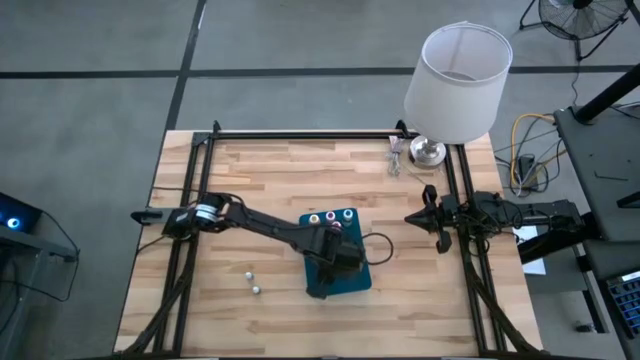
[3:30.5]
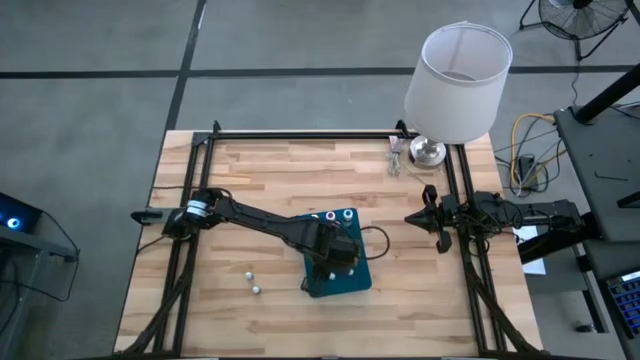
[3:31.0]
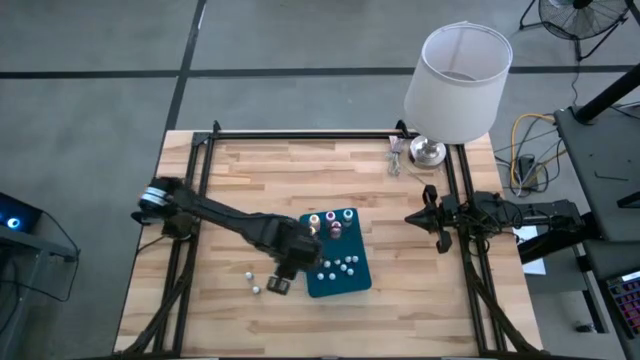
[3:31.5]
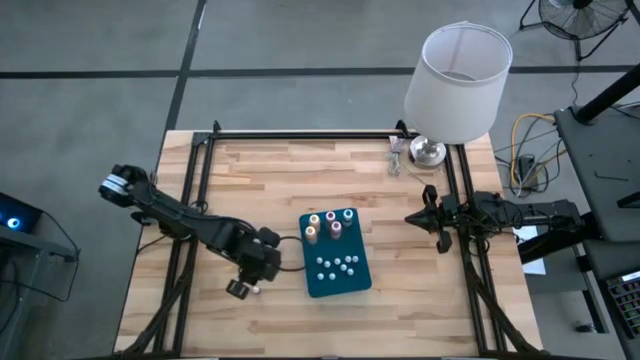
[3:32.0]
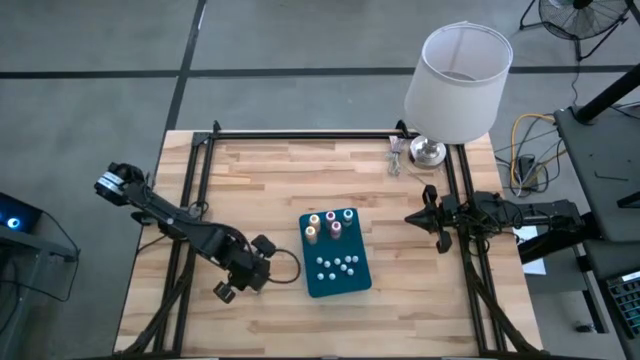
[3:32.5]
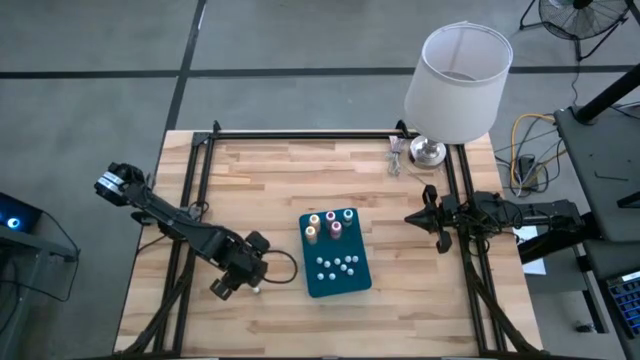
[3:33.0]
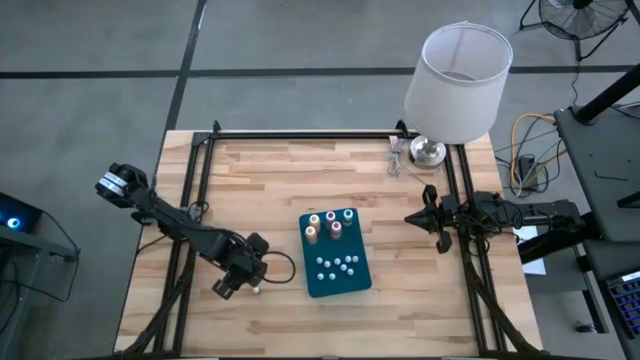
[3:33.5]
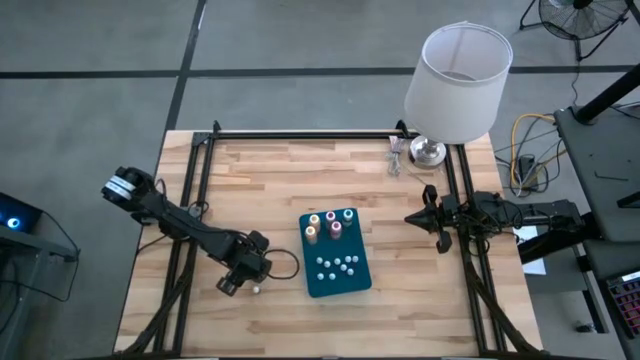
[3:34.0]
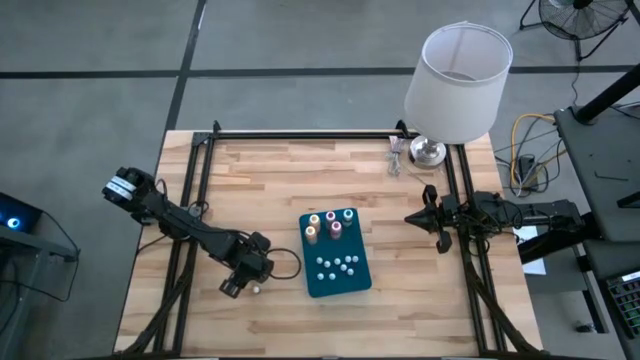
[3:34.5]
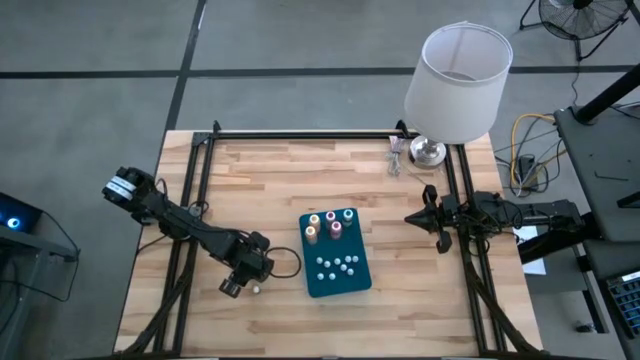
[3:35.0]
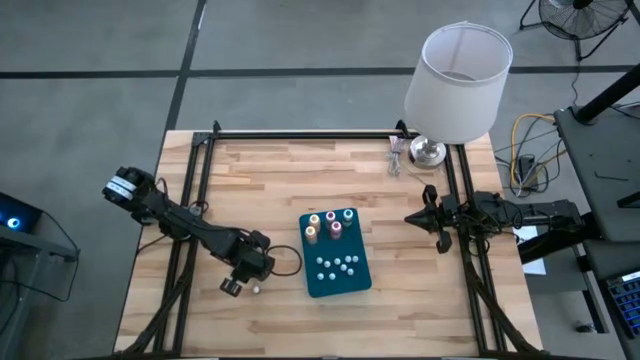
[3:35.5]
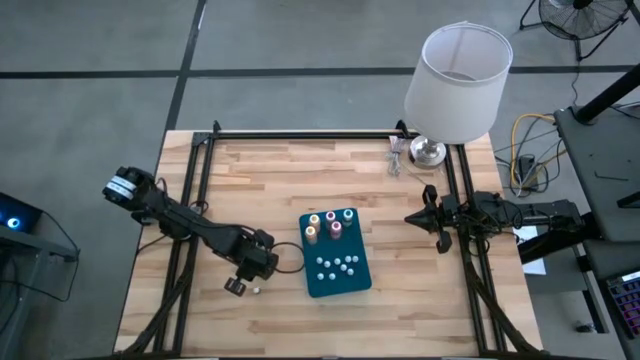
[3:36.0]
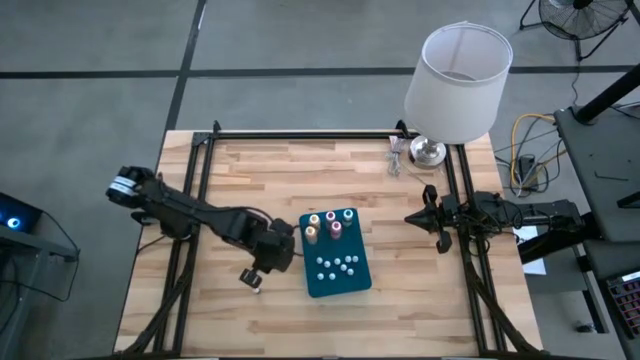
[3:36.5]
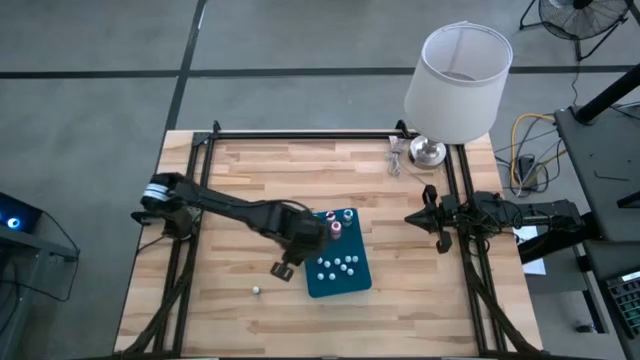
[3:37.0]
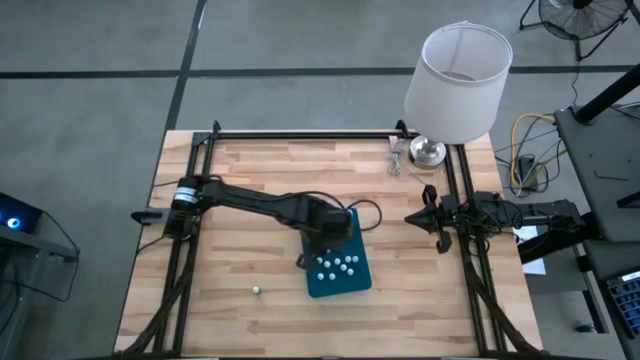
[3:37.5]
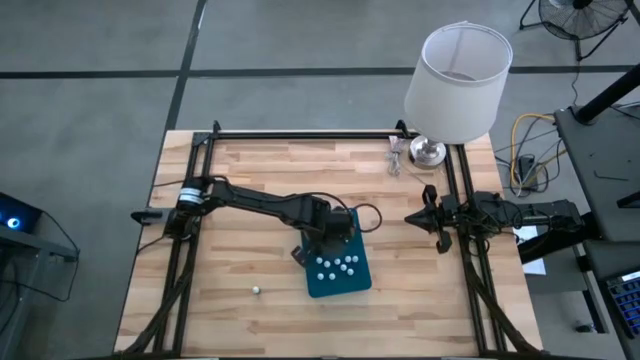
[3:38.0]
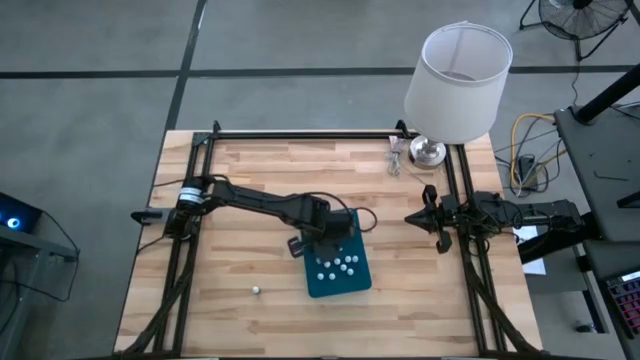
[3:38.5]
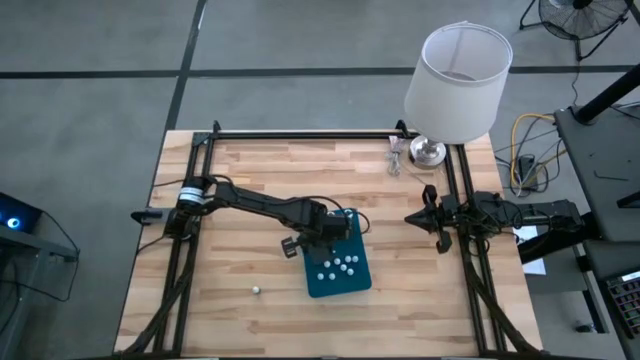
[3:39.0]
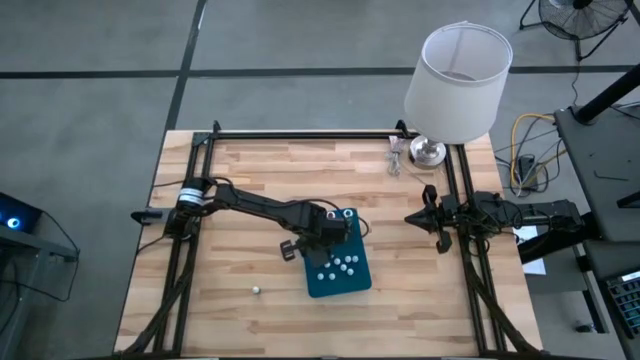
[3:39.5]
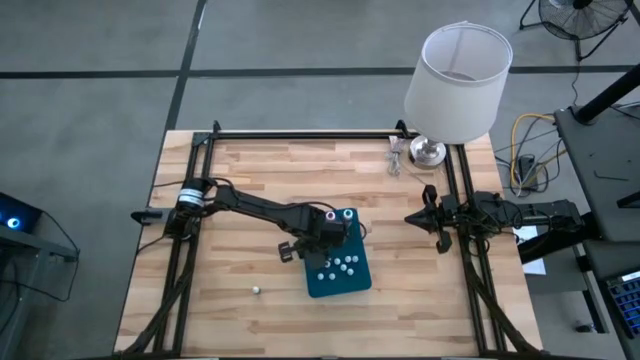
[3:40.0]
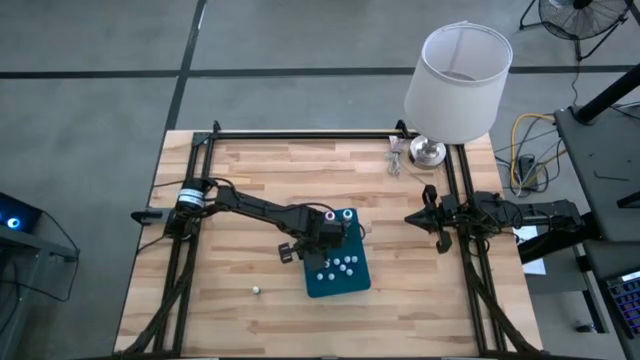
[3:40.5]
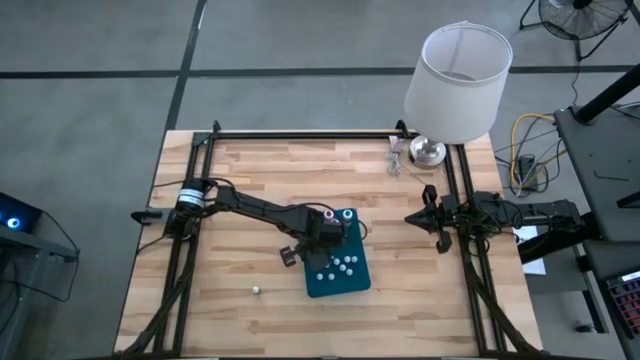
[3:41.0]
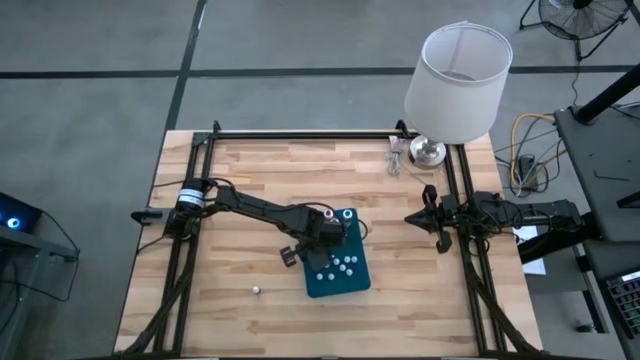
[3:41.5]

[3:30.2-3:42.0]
Task: Pick & Place food coloring
Put the top small black food coloring bottle into the blue bin

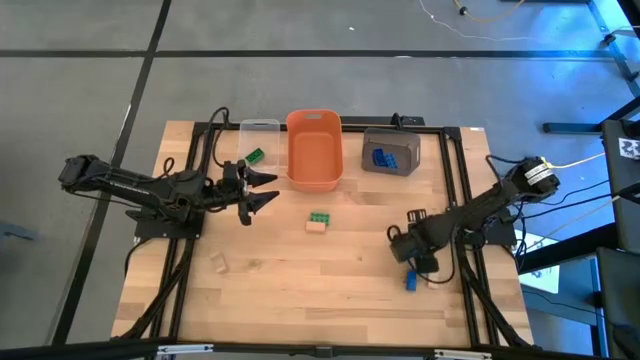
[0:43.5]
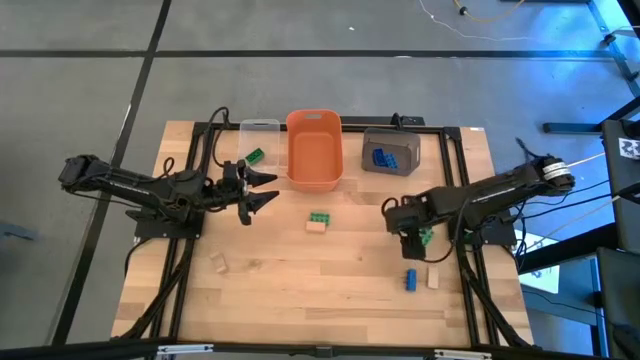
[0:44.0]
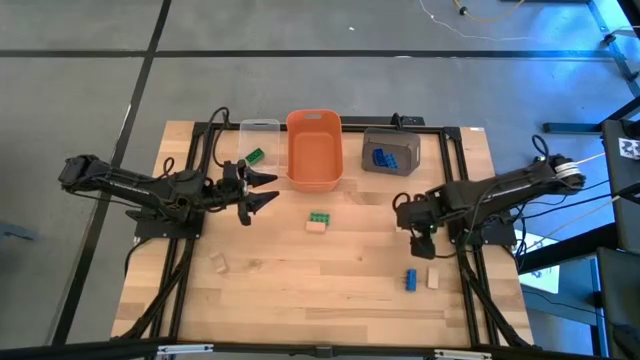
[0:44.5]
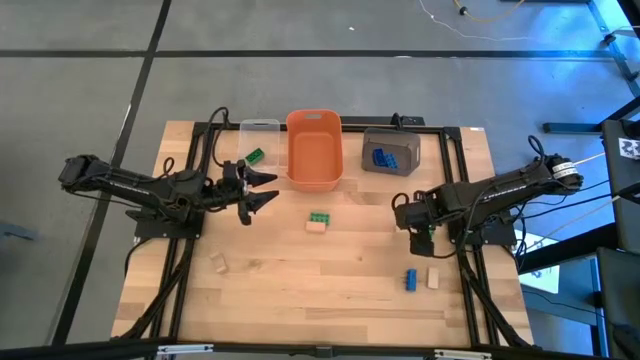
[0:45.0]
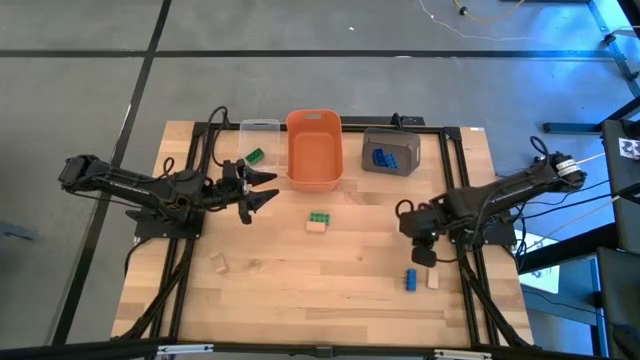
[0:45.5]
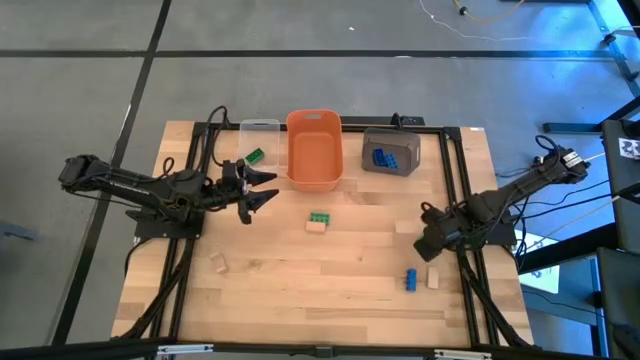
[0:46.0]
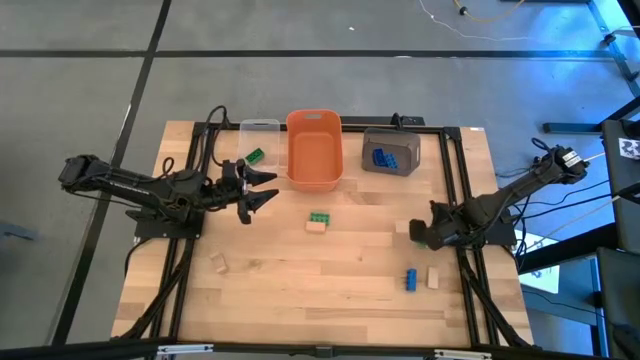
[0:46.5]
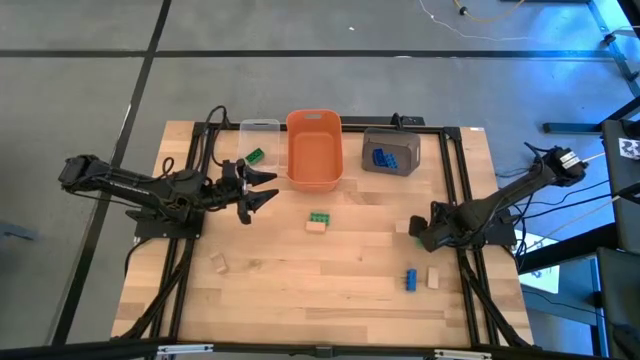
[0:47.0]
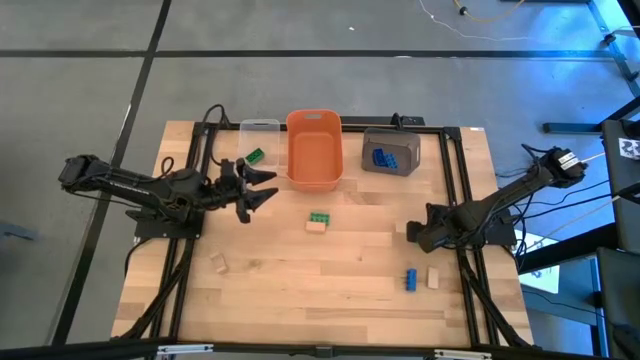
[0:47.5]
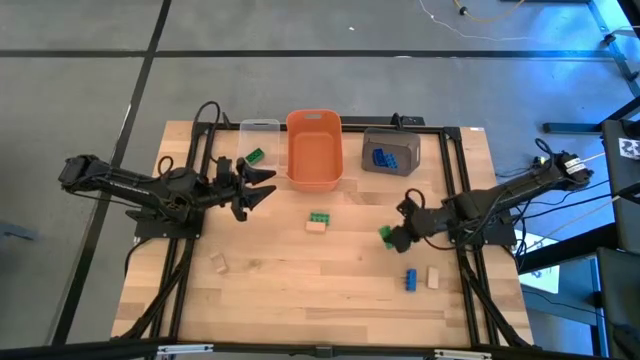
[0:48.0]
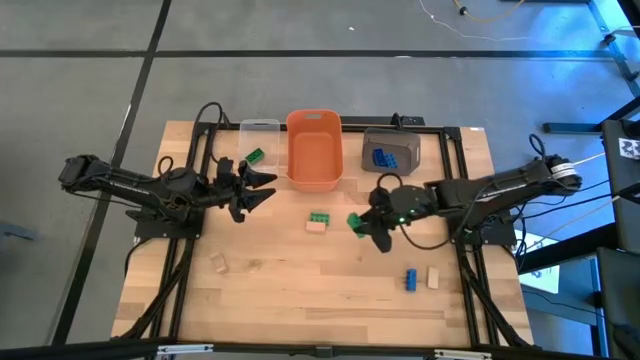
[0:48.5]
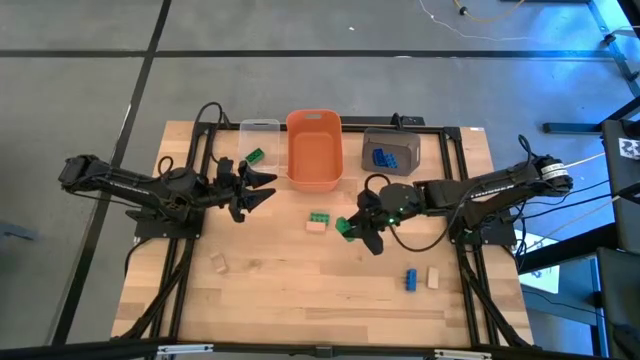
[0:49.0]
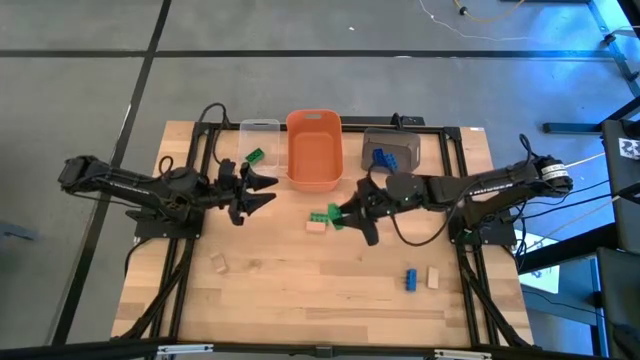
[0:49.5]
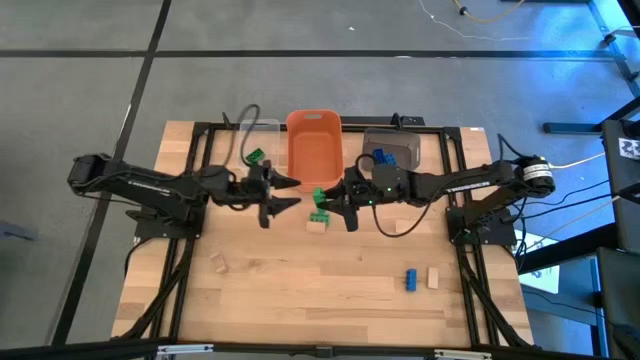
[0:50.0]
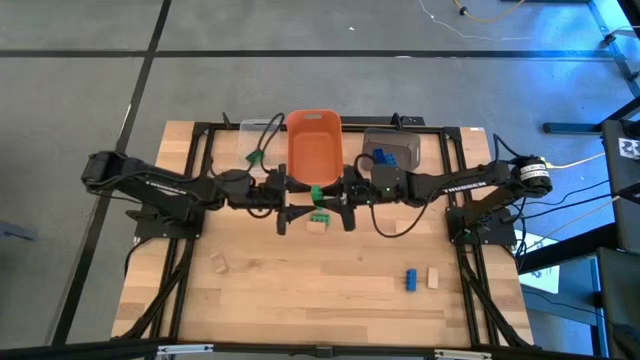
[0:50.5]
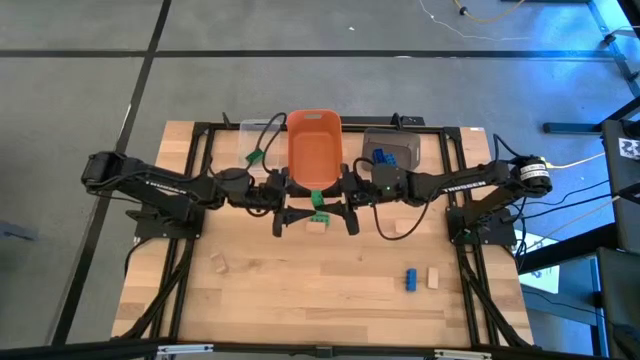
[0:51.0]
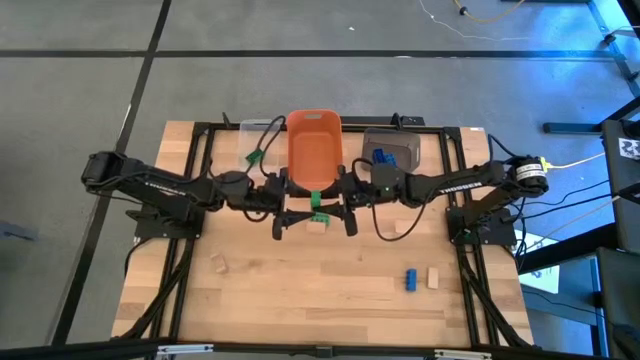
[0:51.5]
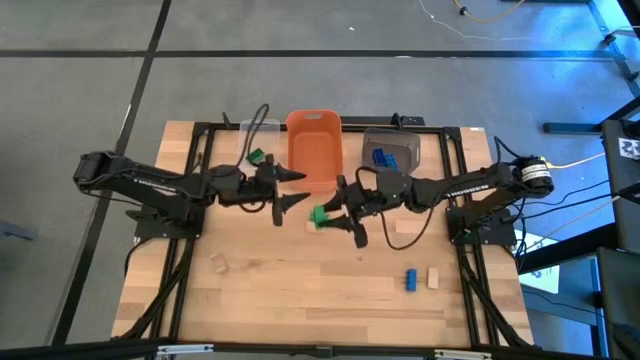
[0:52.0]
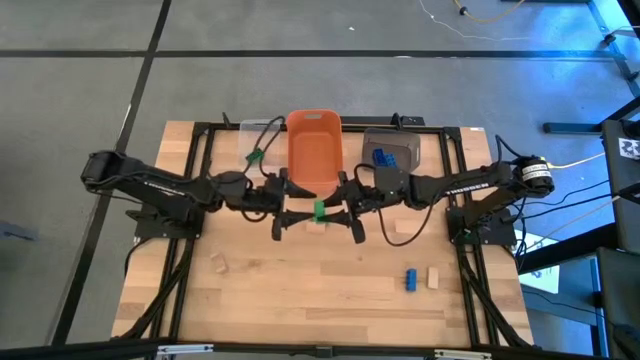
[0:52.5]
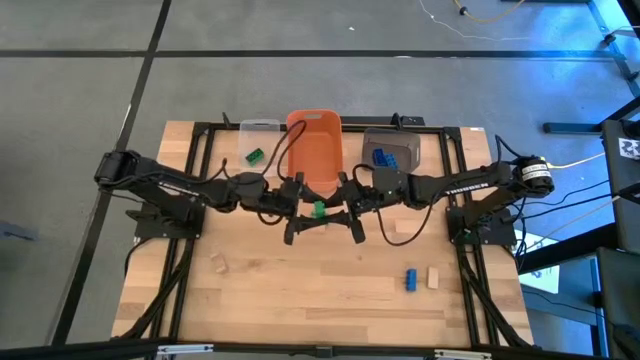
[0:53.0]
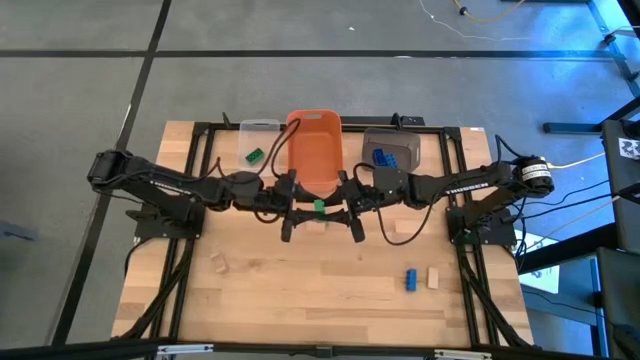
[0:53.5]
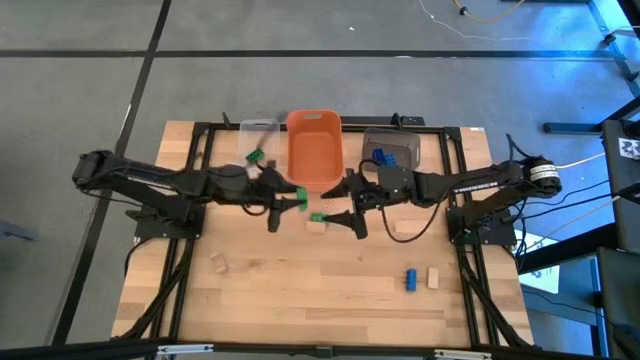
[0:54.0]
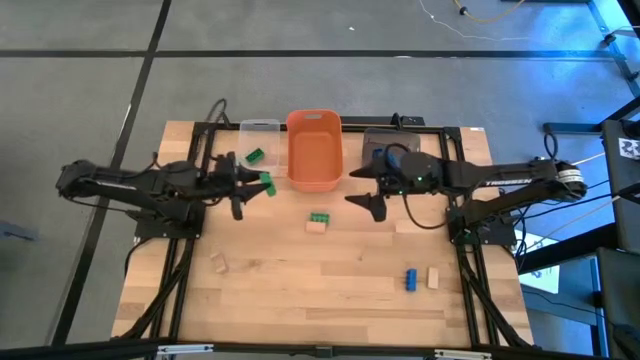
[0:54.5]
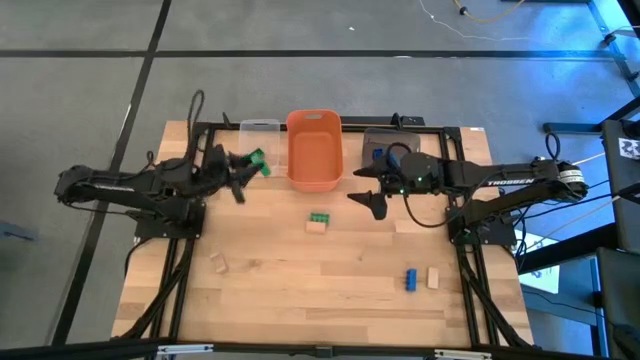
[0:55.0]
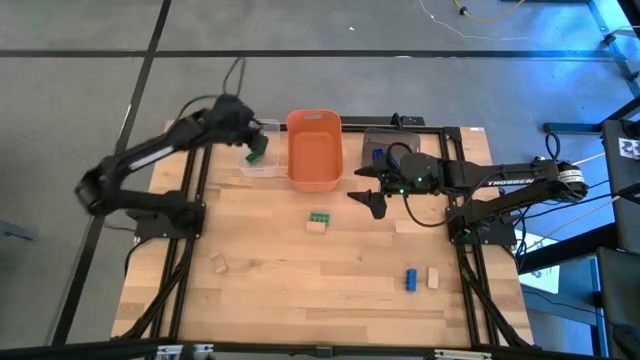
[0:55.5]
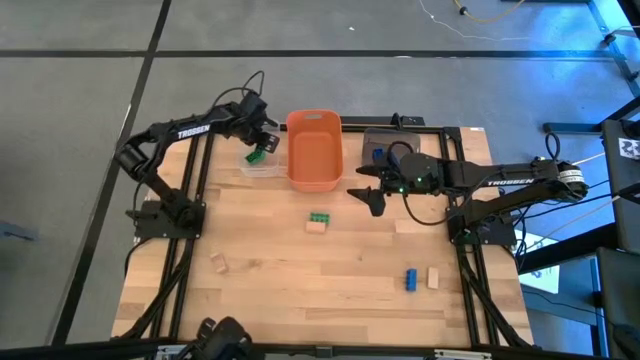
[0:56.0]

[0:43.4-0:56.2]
Task: Sort & place blocks by color
Put the bottom green game piece into the transparent bin
